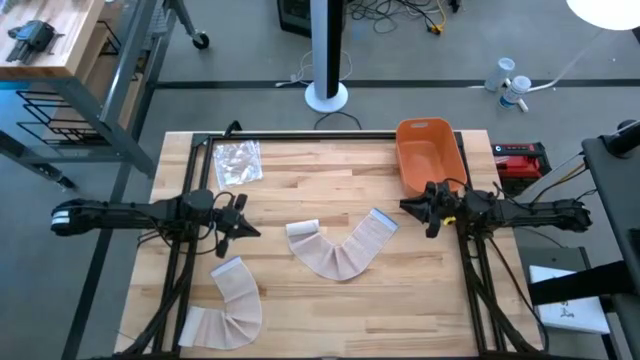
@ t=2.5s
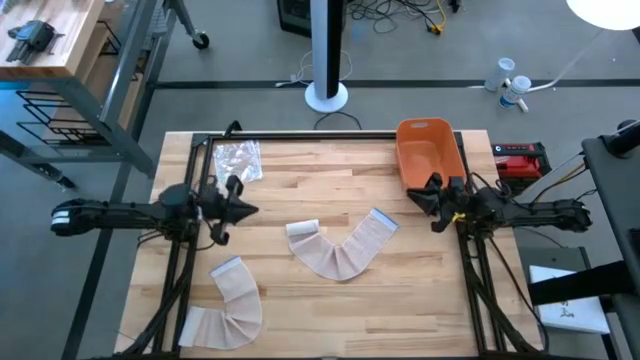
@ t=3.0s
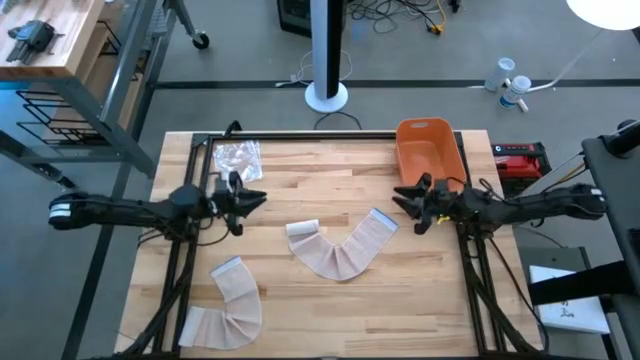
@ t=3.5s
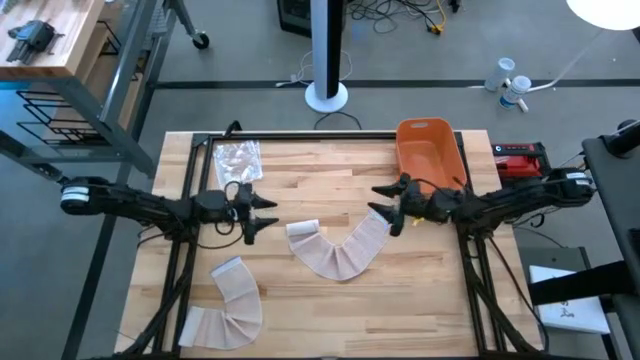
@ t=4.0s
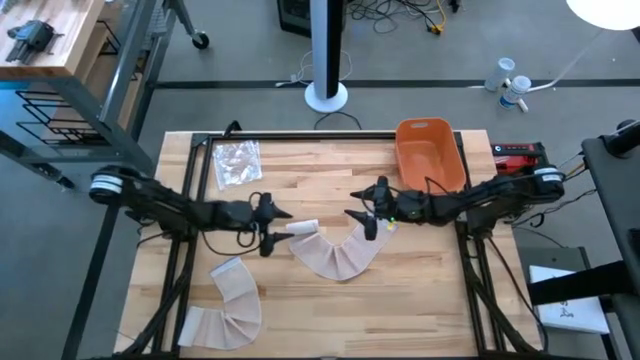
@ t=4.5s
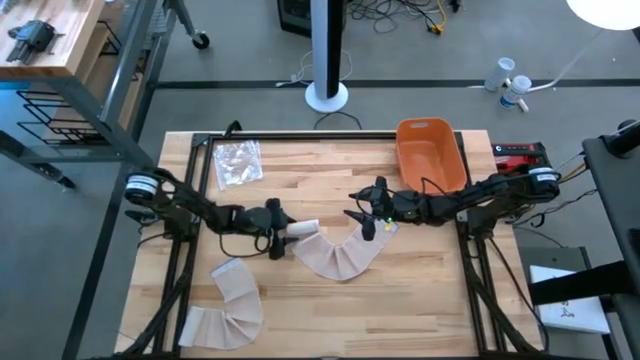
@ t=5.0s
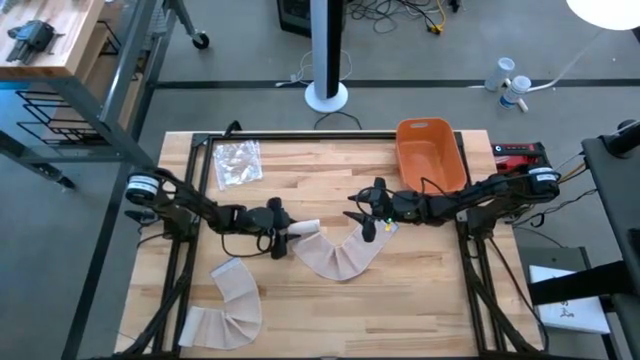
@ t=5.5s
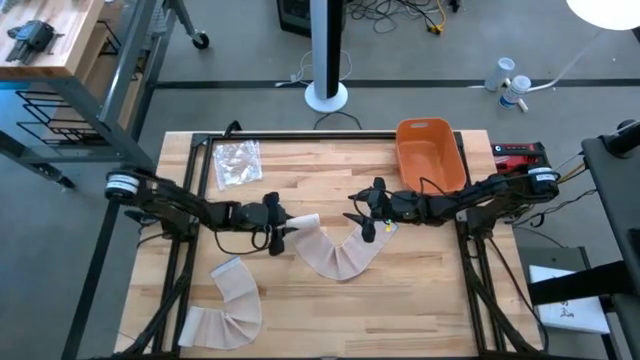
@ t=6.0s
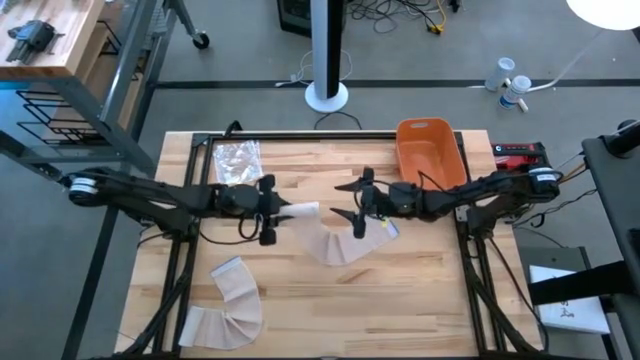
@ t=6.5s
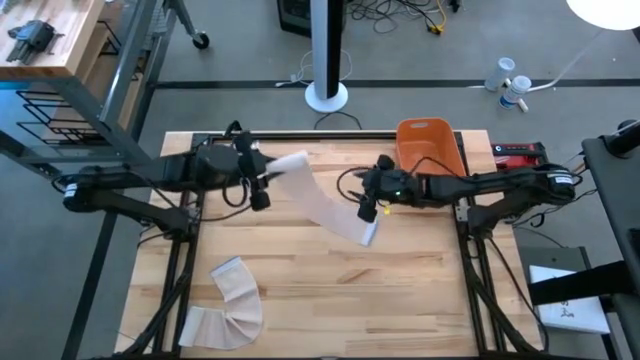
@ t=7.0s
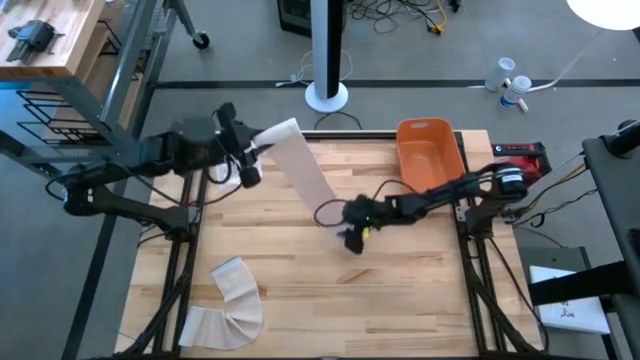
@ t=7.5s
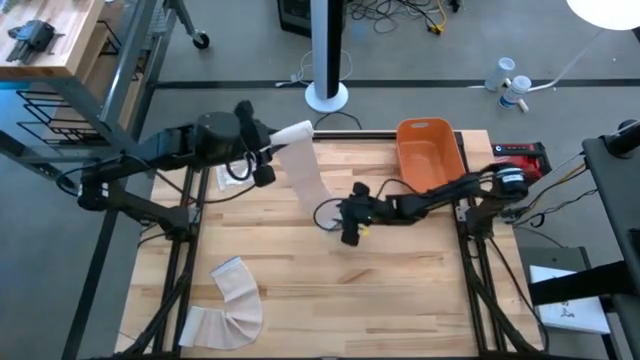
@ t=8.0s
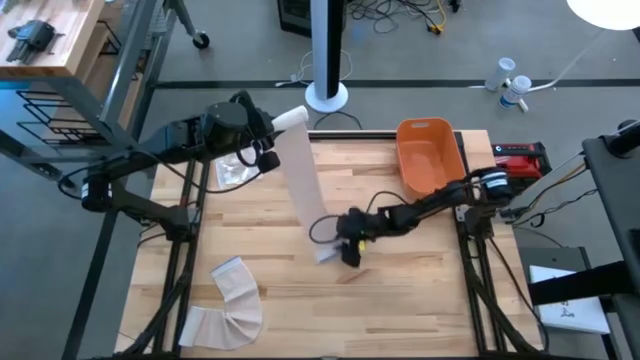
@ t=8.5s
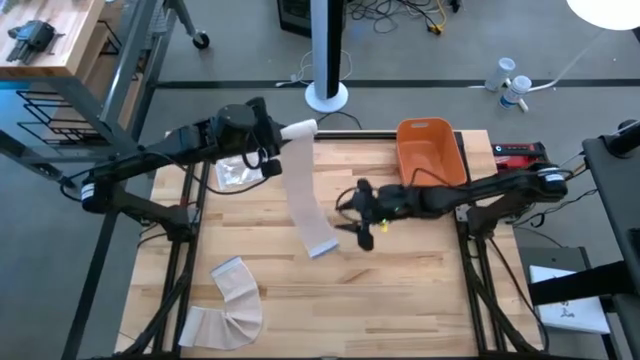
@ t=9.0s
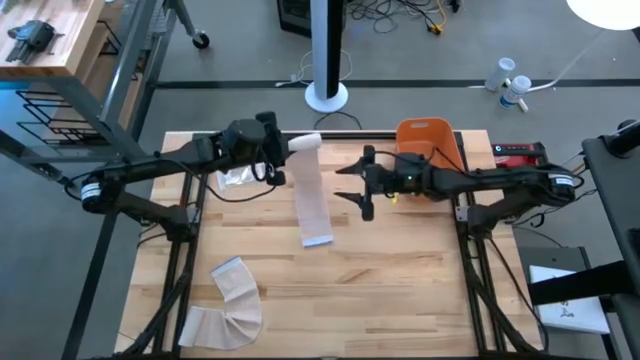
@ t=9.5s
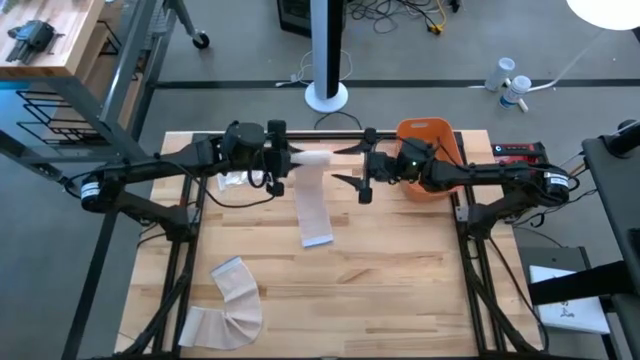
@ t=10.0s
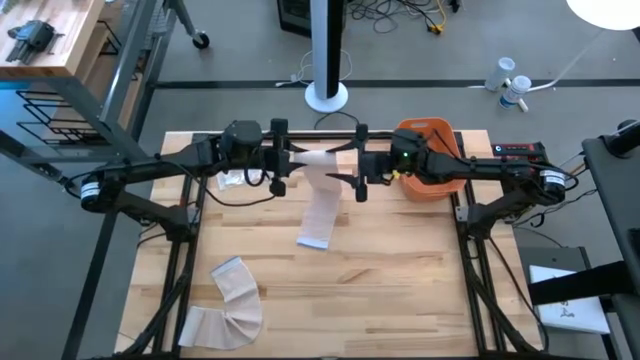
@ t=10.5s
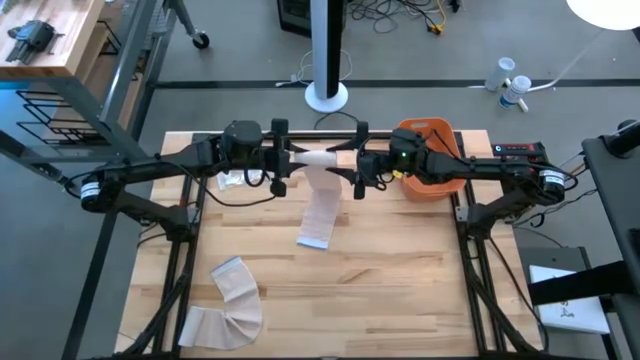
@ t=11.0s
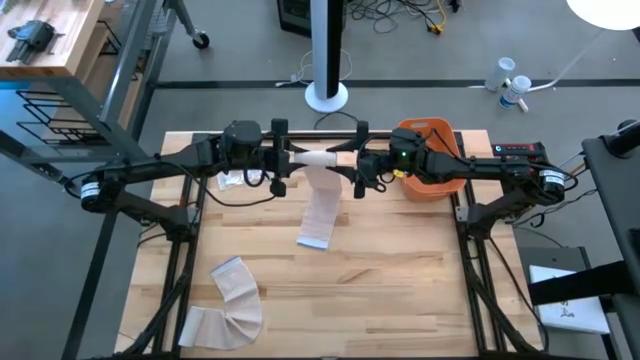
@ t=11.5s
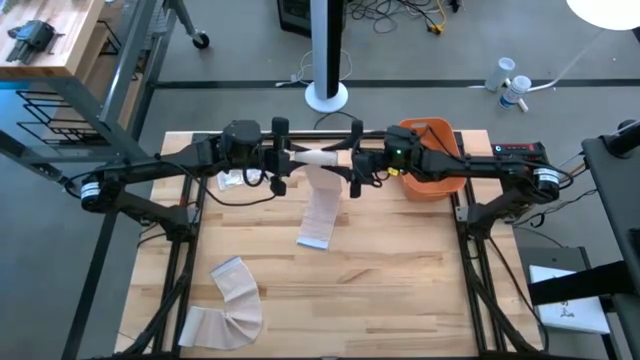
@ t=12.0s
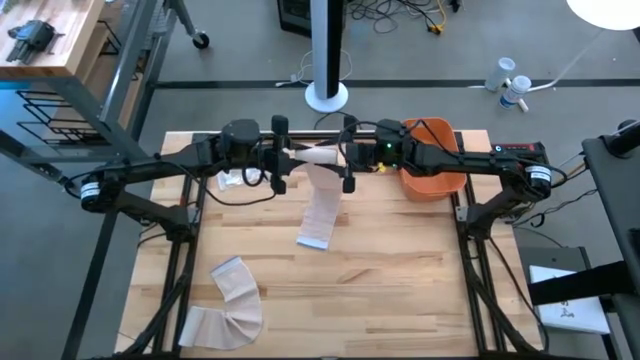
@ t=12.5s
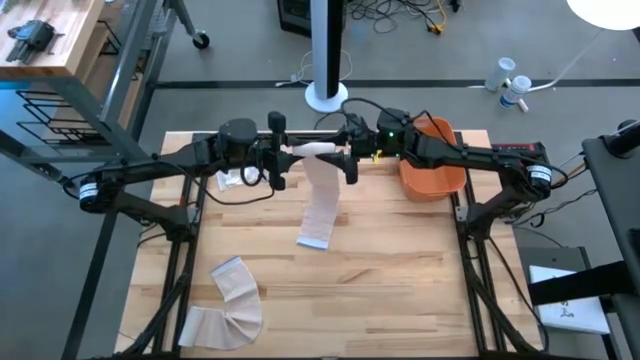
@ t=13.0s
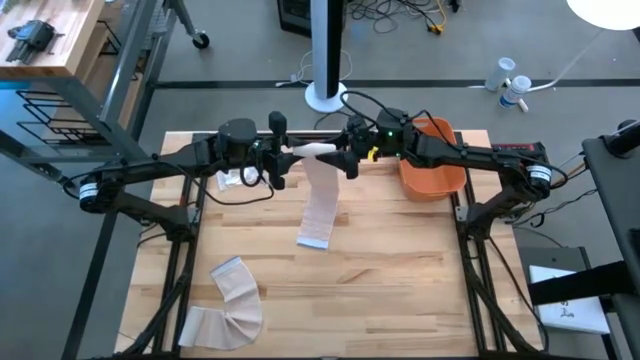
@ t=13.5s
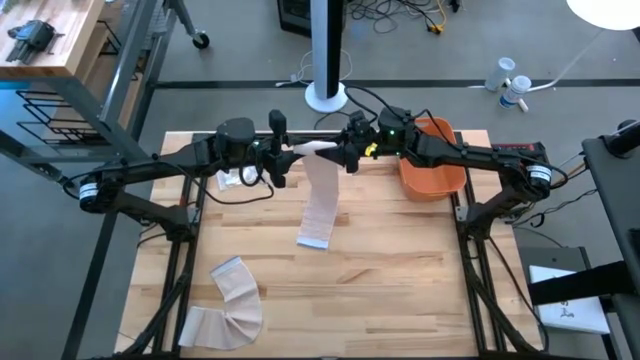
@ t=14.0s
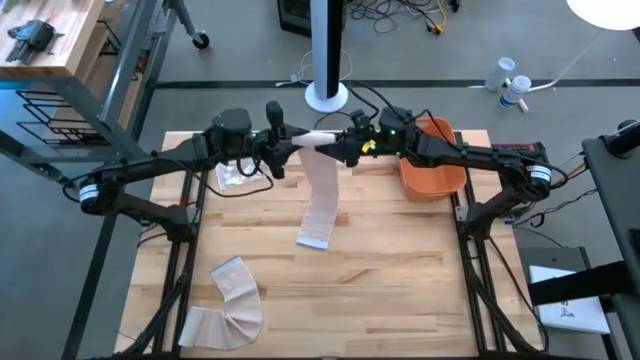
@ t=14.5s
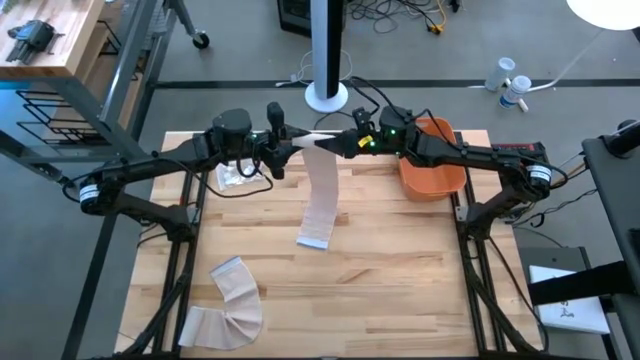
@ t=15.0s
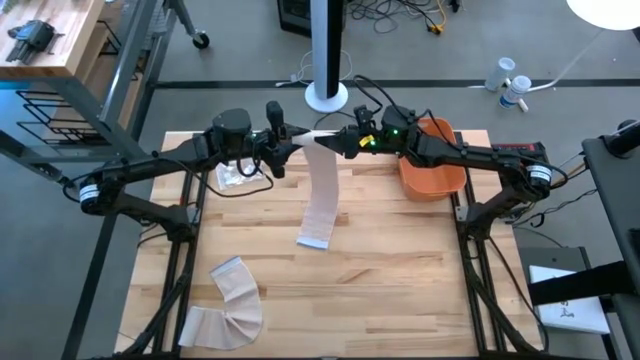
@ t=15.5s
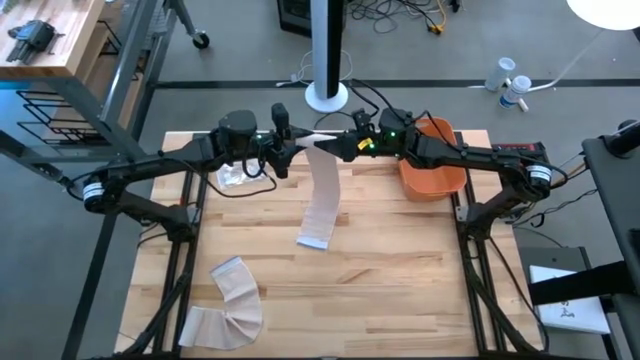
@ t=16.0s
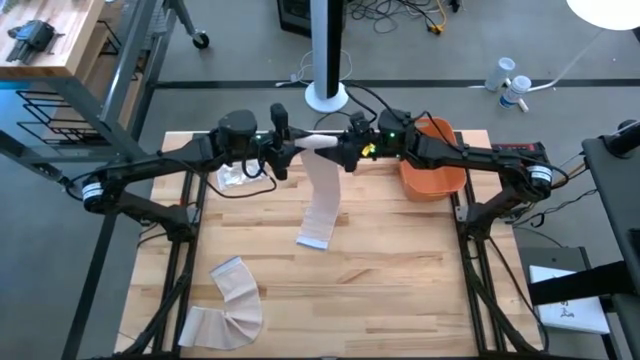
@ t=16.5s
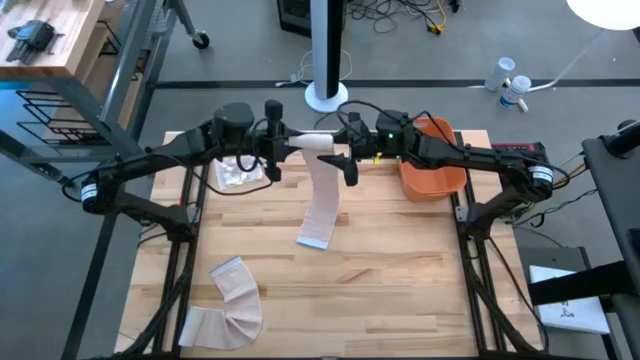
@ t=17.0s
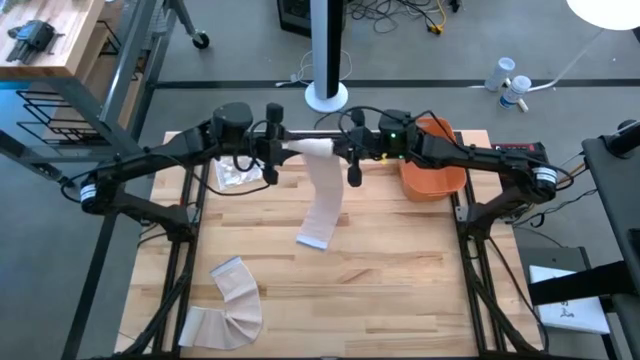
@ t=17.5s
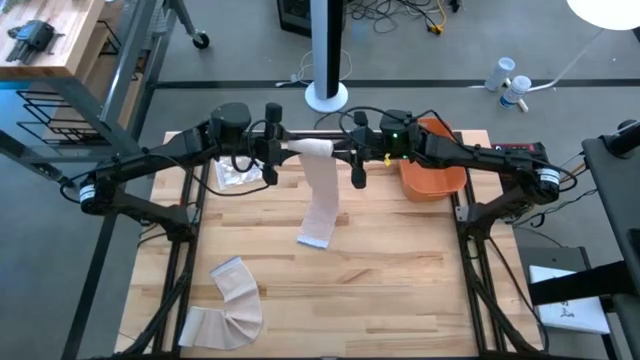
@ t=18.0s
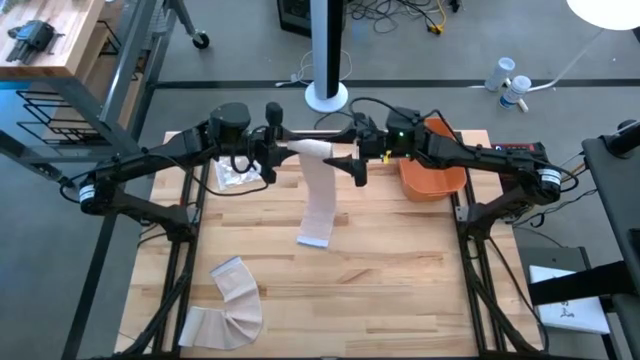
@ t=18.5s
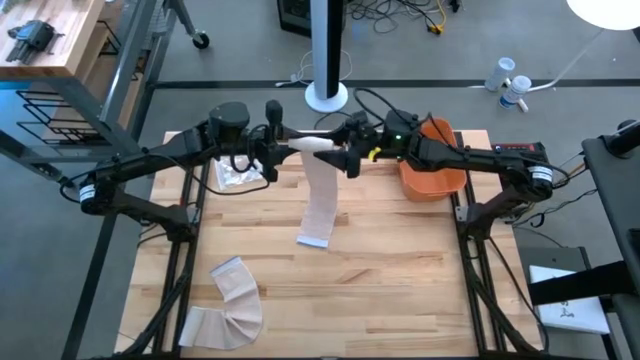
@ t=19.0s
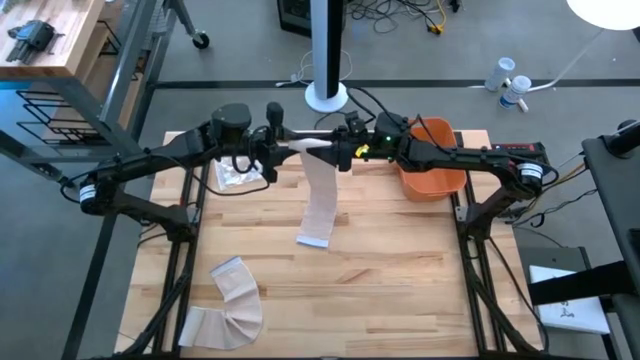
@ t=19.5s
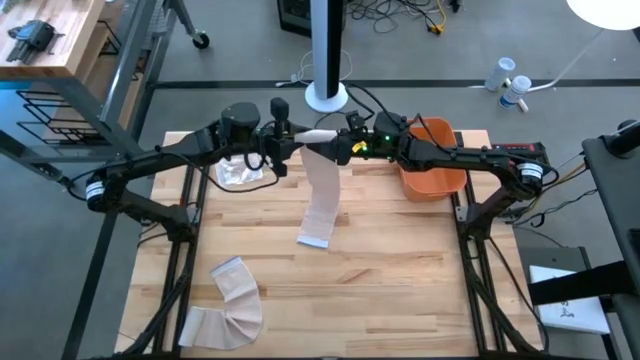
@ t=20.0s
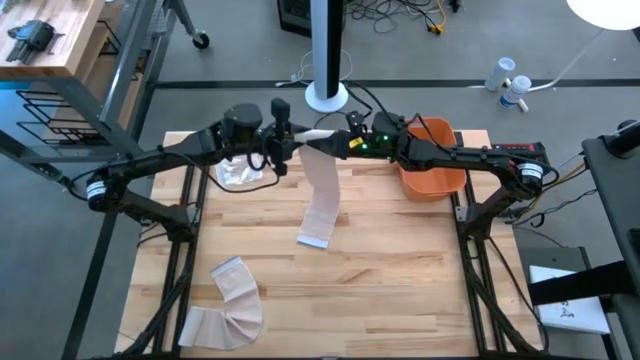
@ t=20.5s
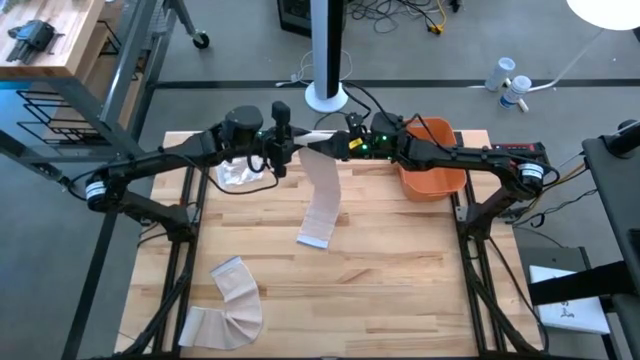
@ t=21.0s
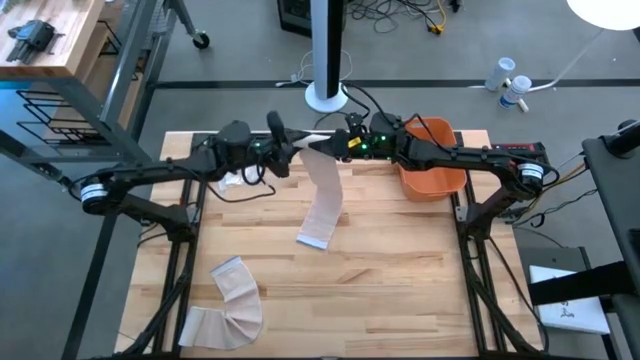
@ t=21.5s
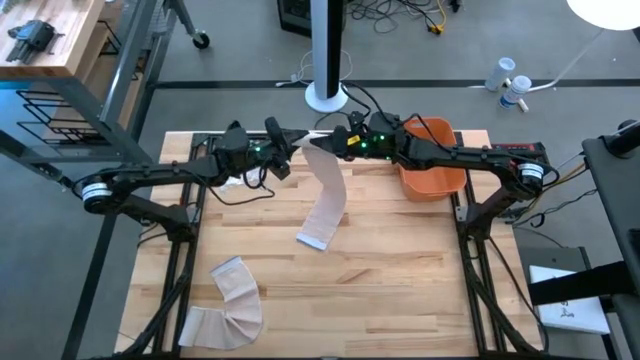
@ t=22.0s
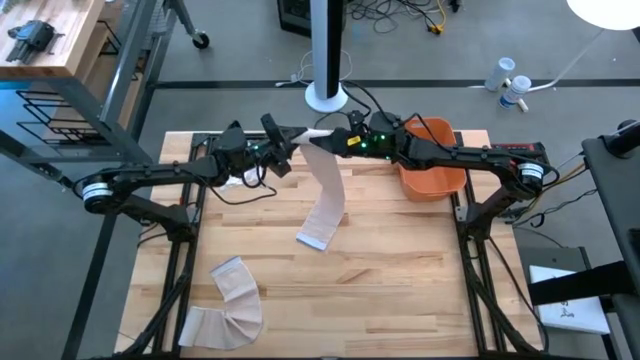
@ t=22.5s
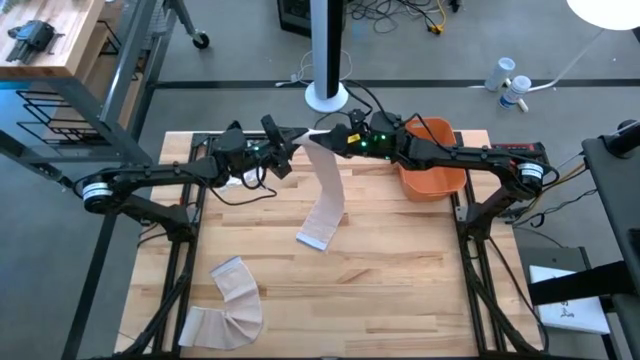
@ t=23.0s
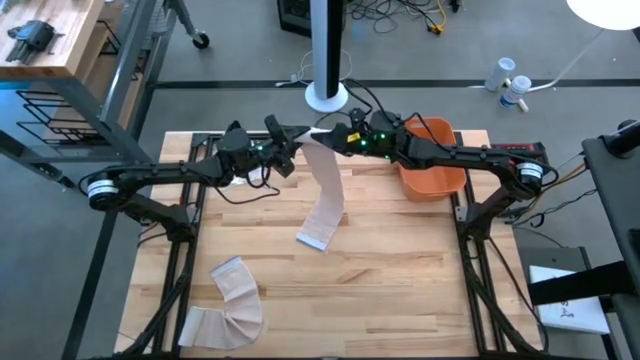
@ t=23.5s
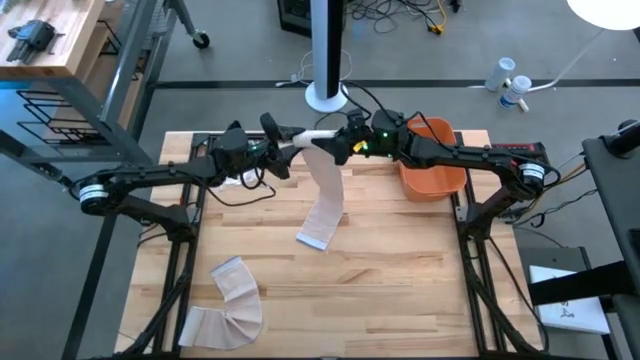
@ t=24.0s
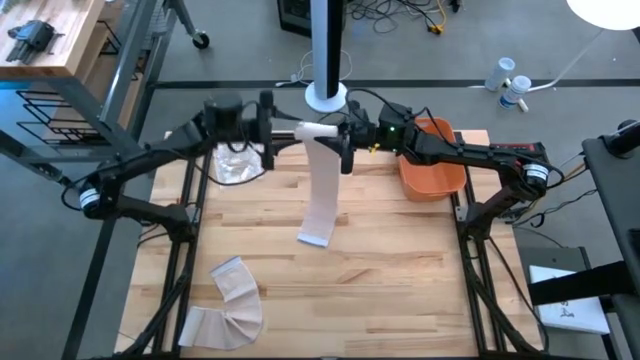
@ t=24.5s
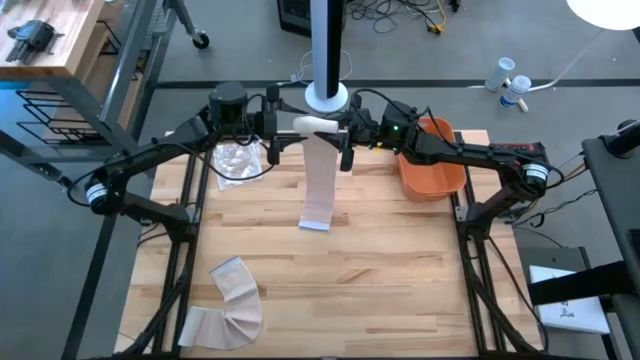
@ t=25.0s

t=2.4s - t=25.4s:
Task: Roll bandage
Roll the center brown bandage
